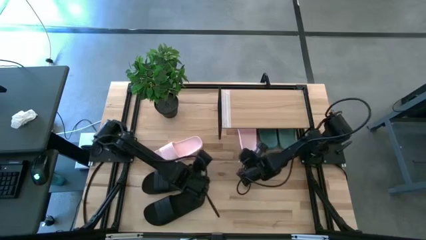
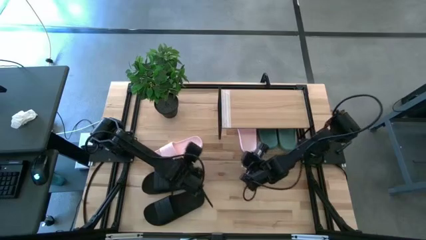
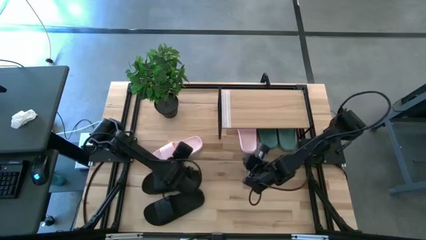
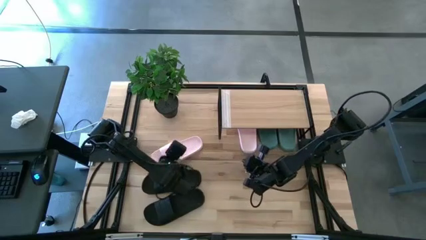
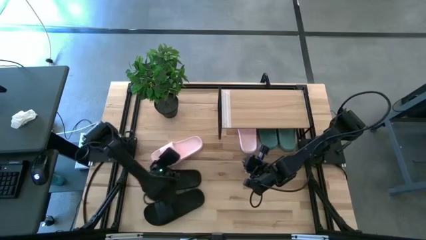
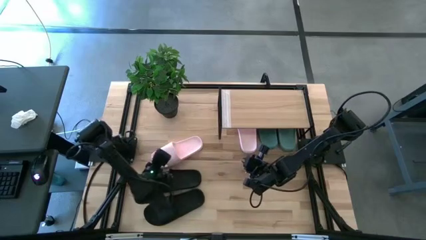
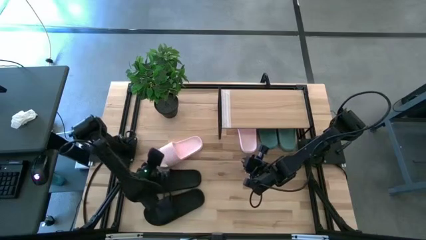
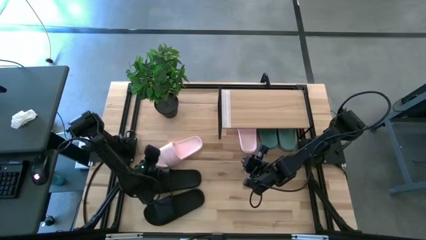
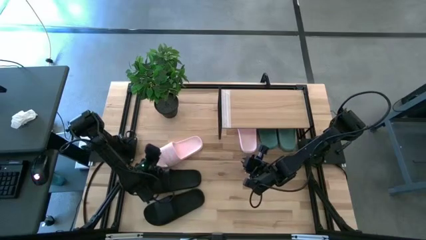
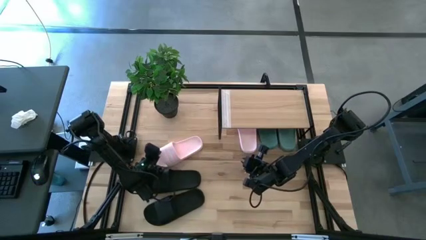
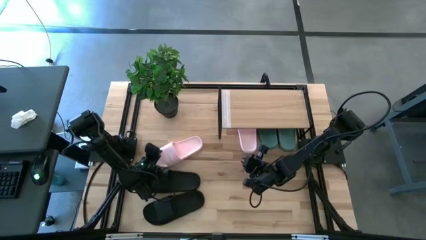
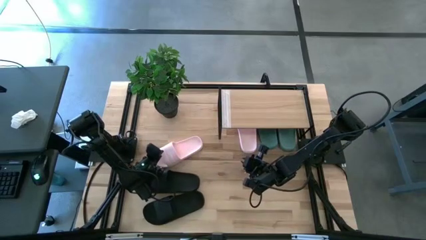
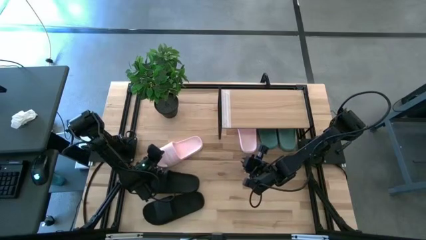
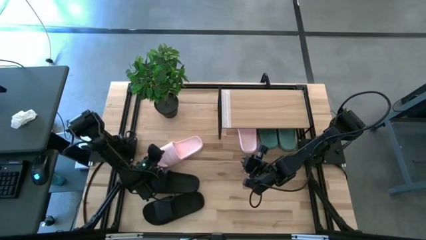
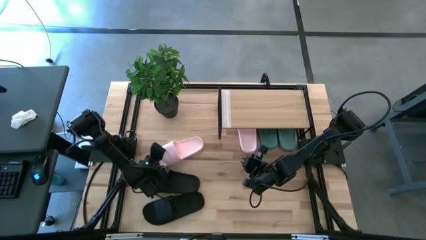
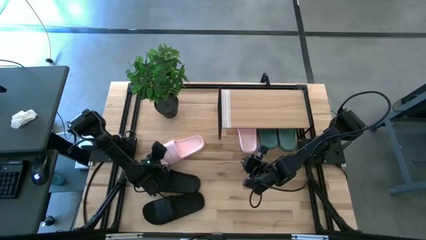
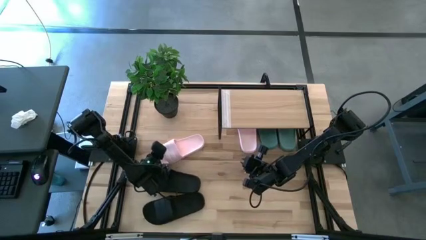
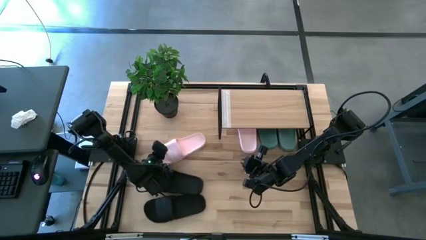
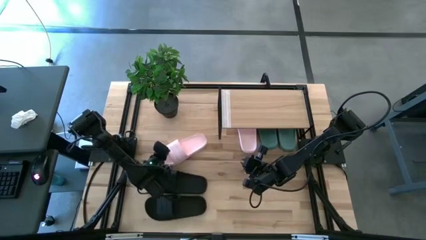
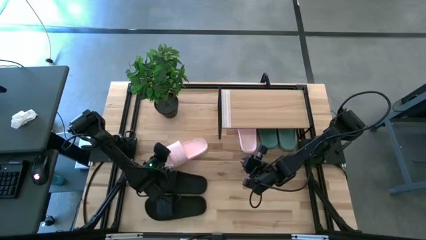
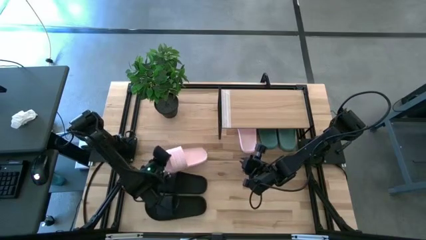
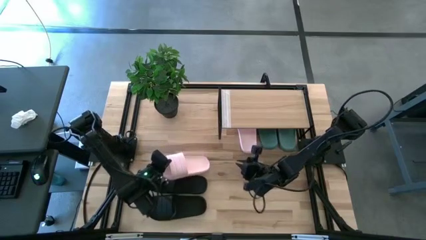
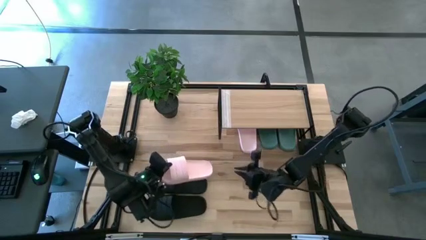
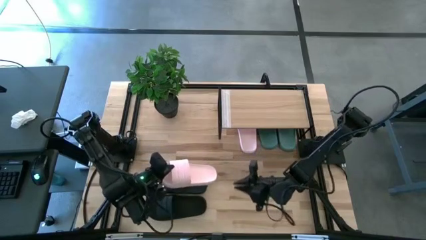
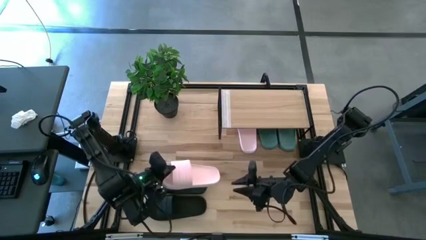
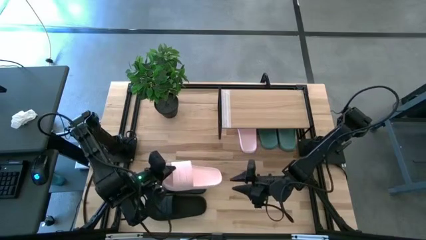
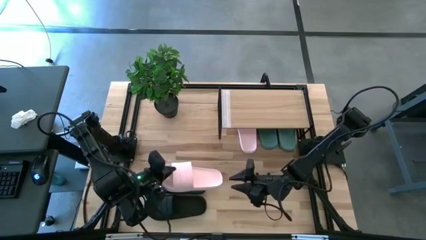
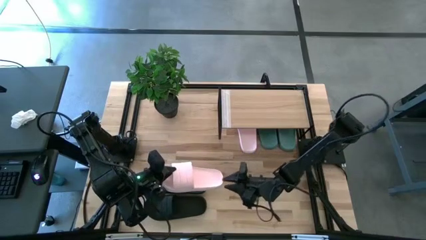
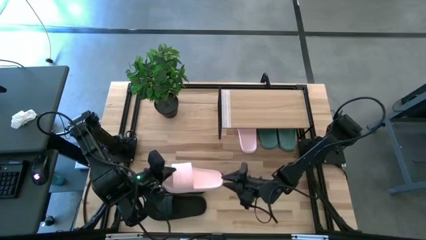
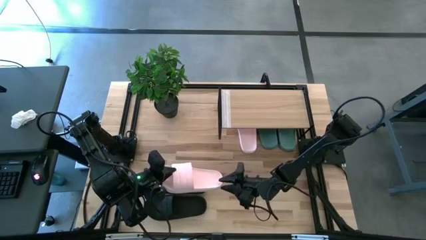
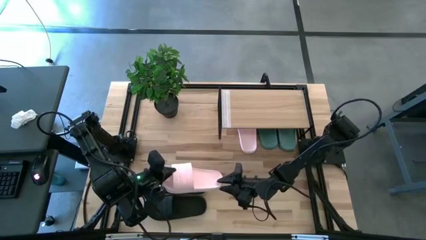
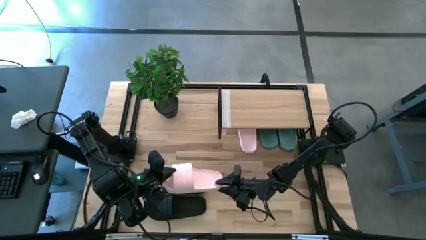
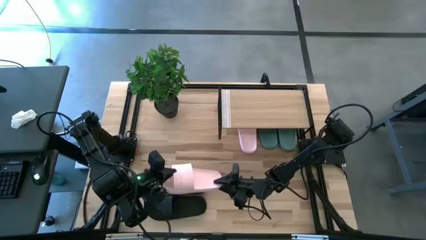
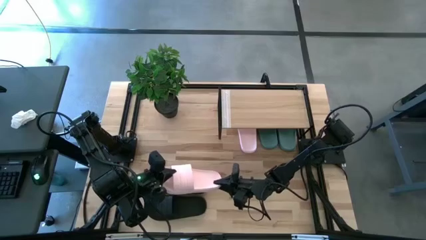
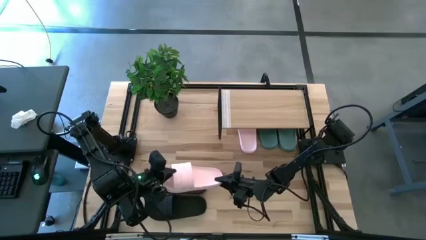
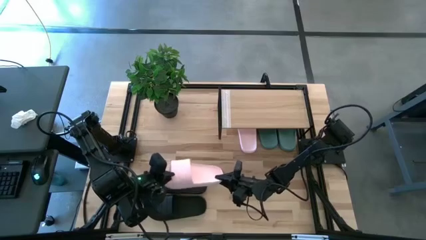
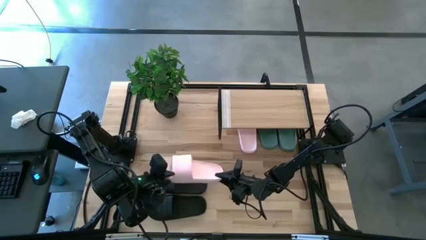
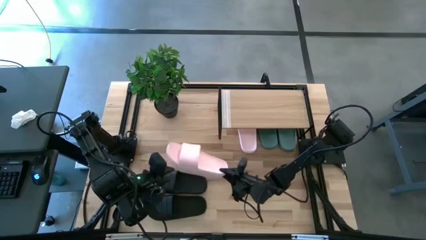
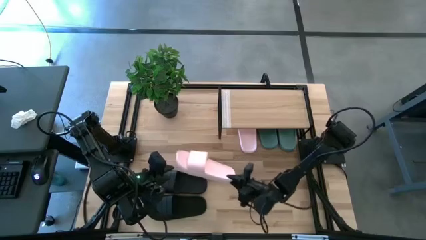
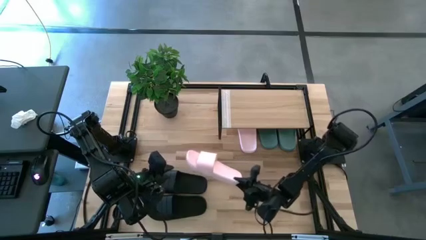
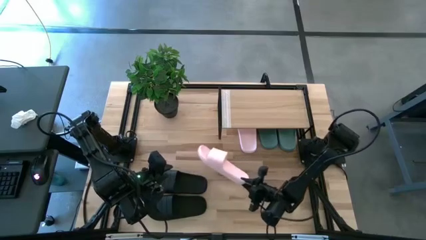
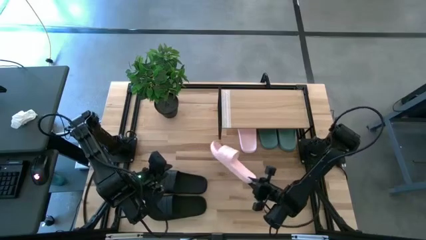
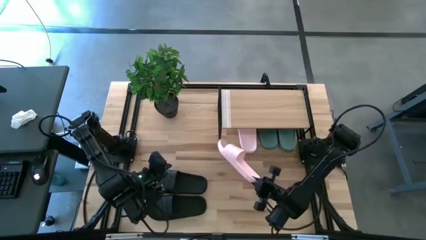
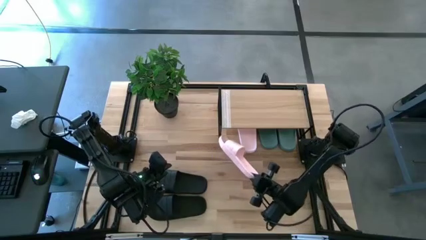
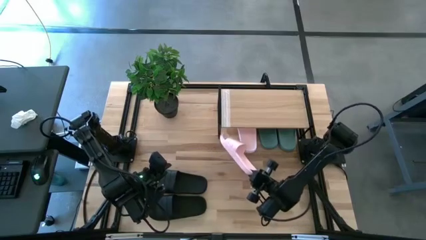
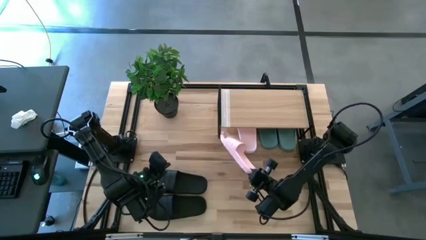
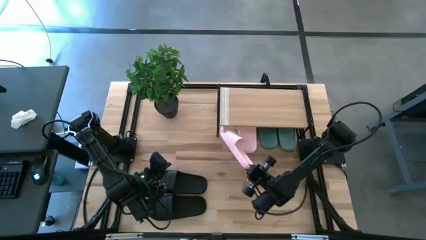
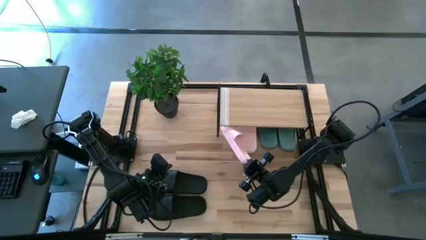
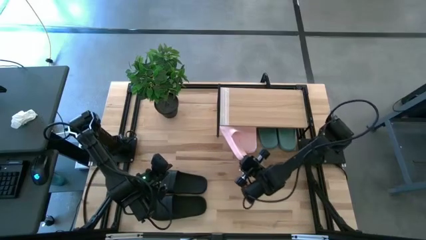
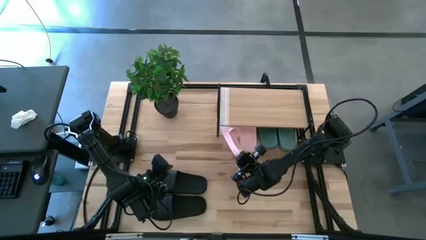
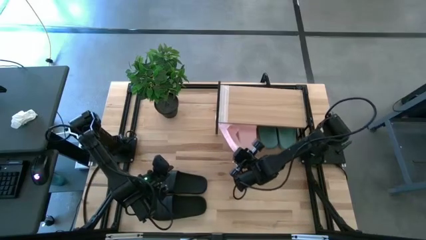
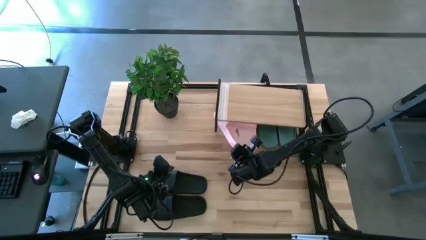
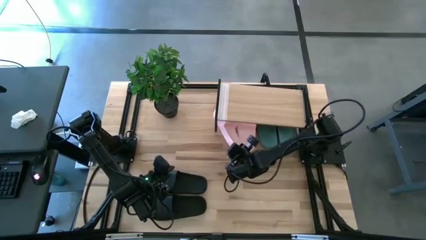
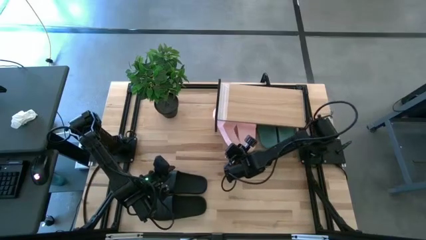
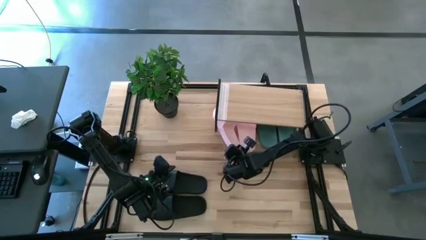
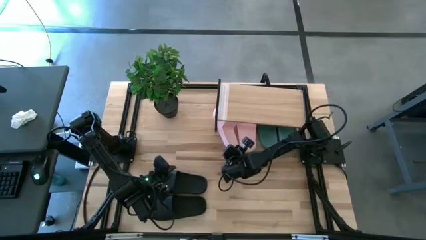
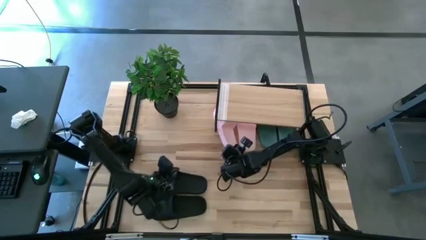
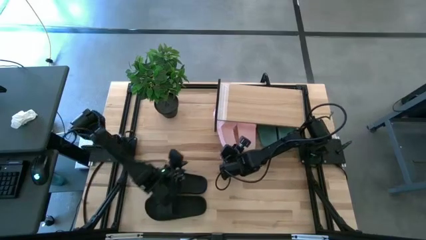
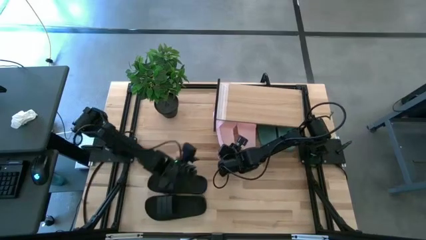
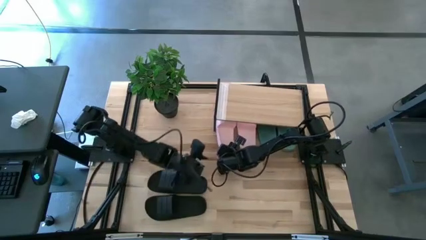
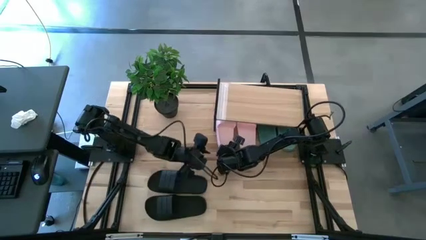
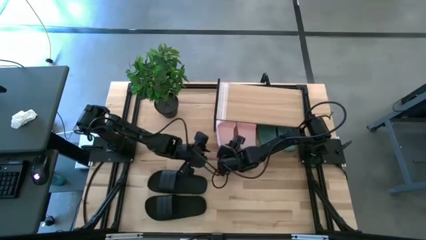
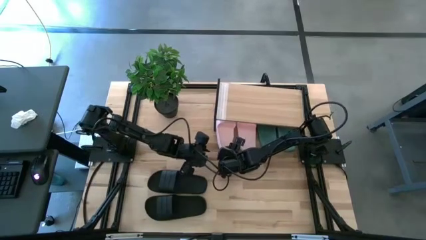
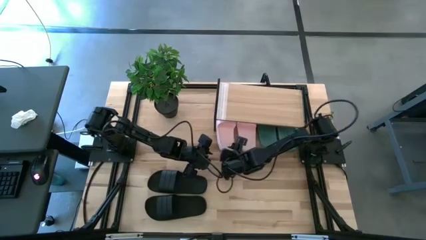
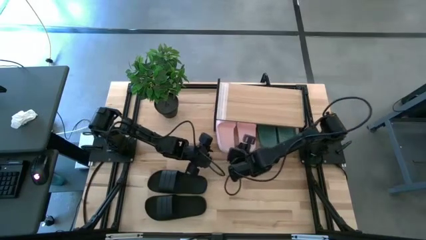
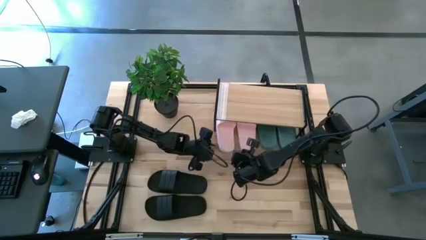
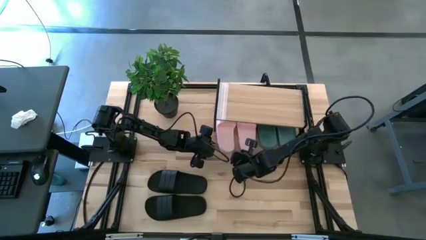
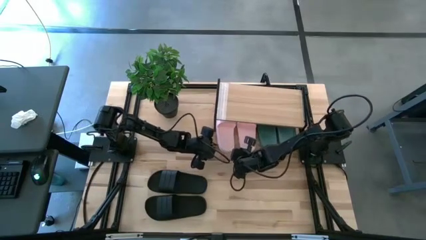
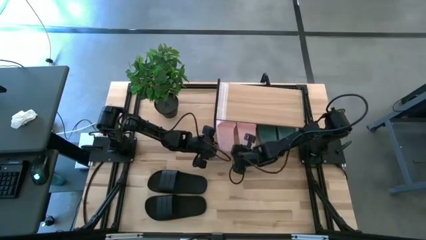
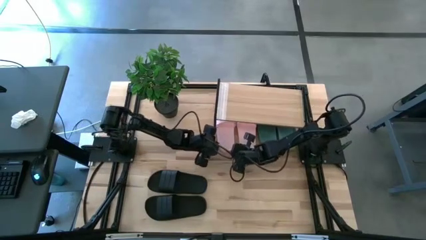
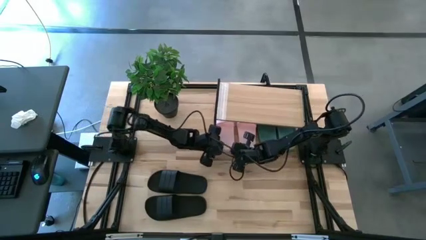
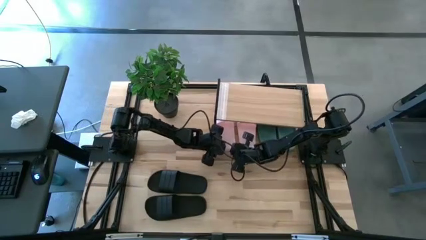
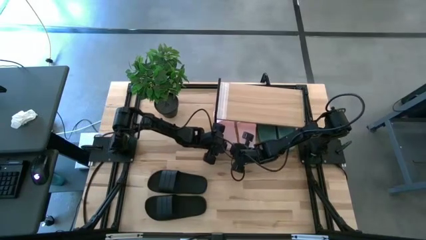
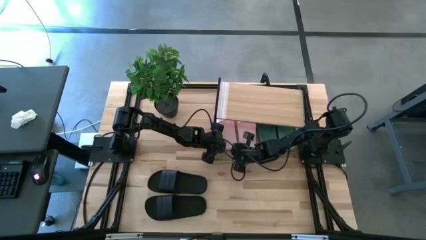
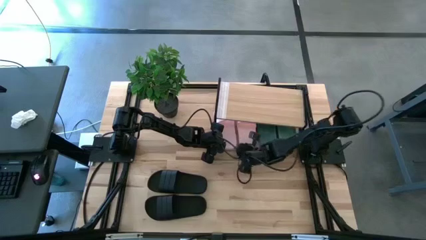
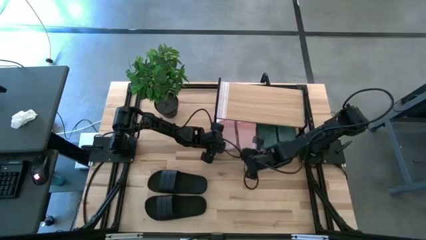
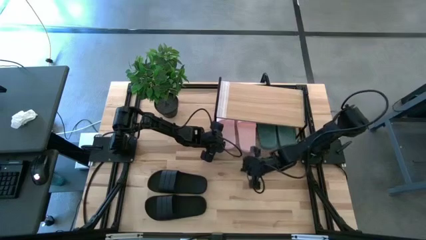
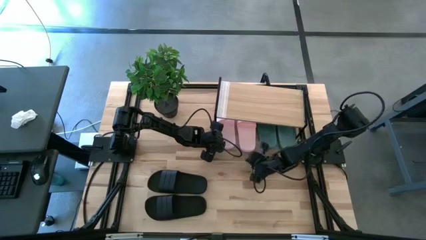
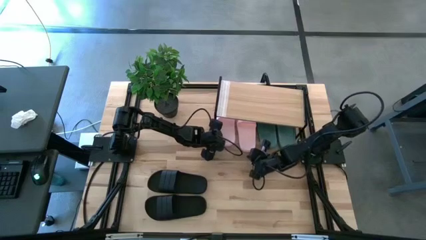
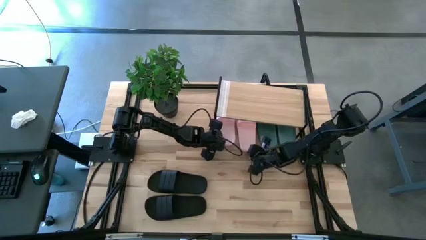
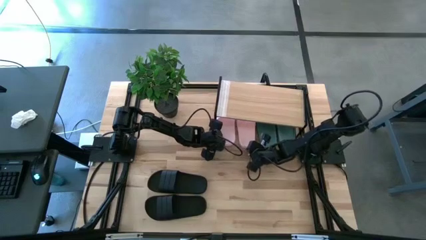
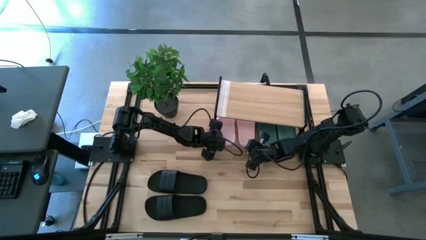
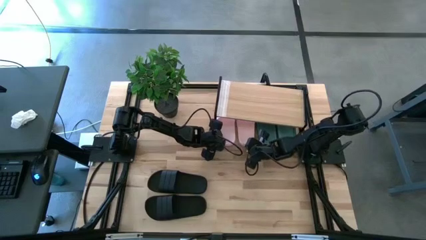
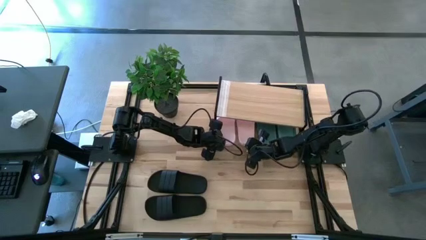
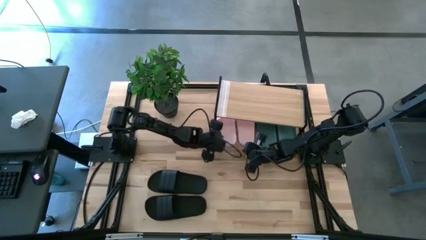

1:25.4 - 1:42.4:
Task: Pick and place slides into the shelf
Put the pink slide under the shelf
